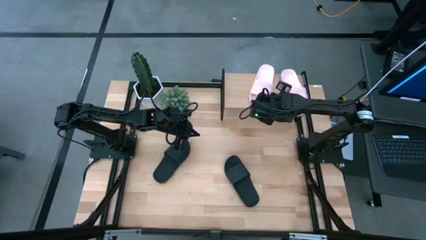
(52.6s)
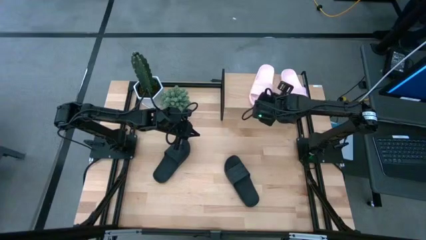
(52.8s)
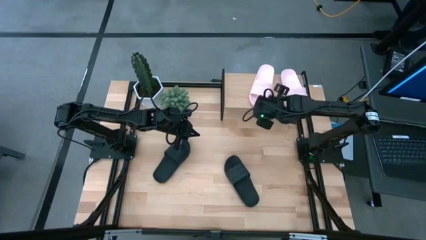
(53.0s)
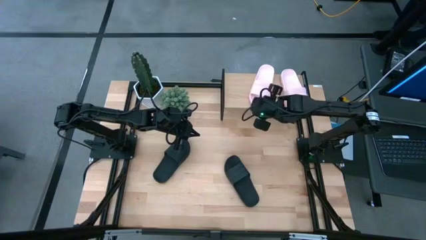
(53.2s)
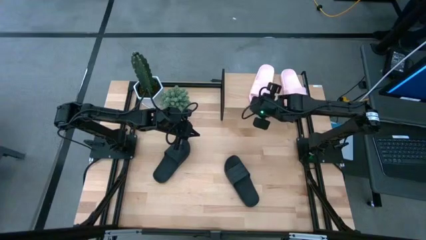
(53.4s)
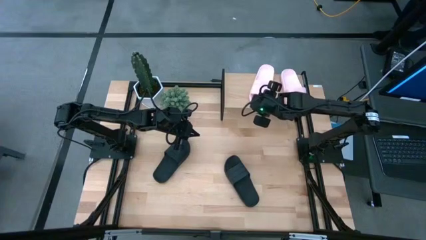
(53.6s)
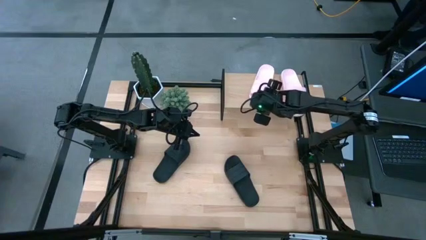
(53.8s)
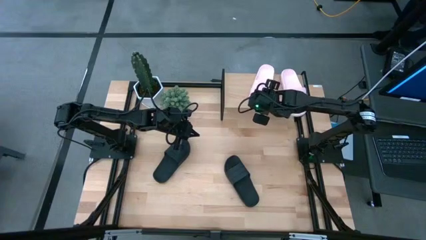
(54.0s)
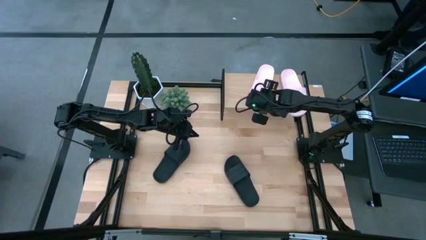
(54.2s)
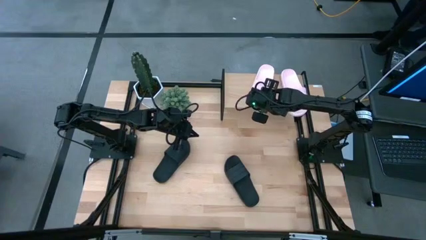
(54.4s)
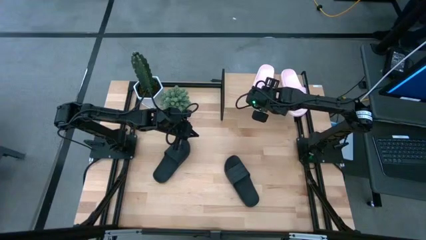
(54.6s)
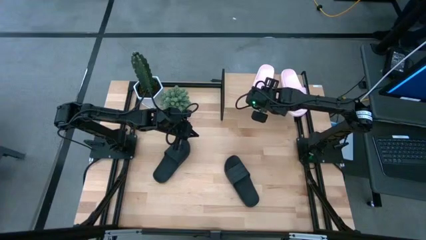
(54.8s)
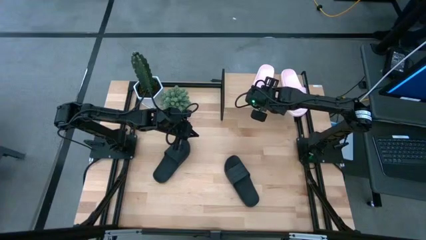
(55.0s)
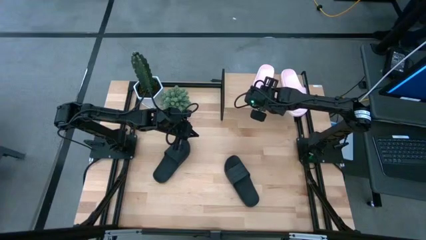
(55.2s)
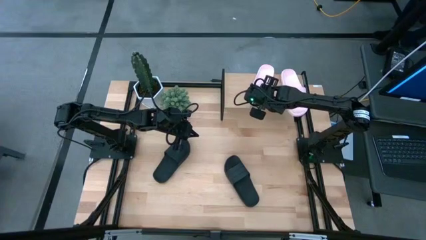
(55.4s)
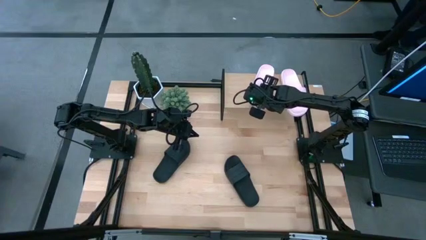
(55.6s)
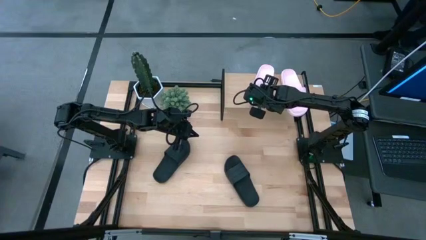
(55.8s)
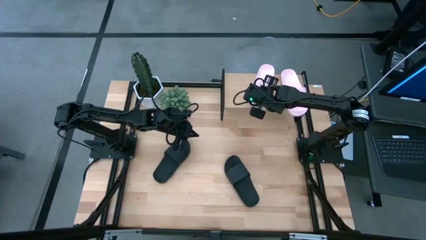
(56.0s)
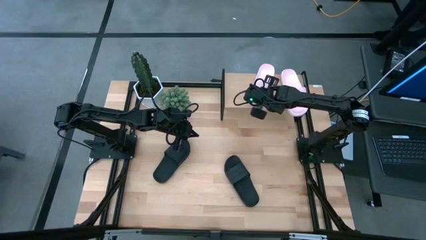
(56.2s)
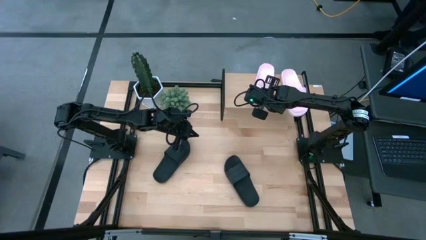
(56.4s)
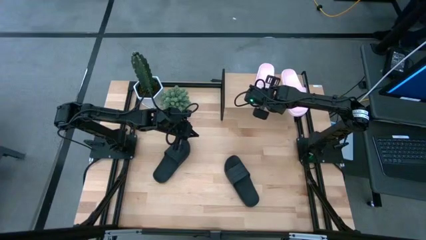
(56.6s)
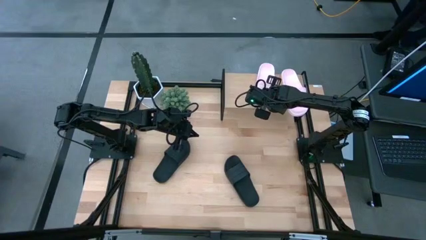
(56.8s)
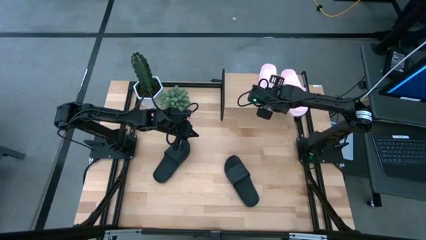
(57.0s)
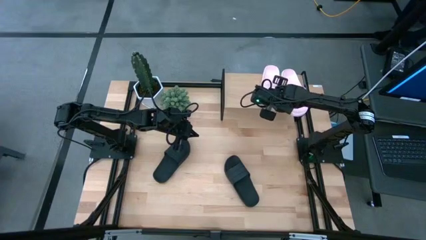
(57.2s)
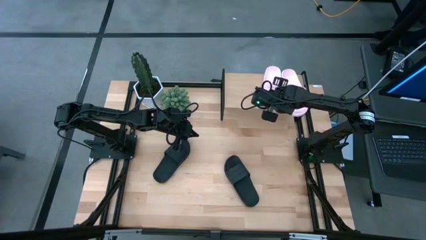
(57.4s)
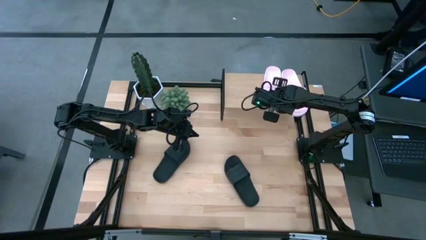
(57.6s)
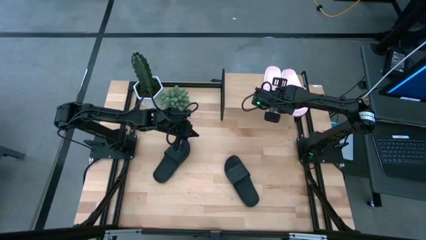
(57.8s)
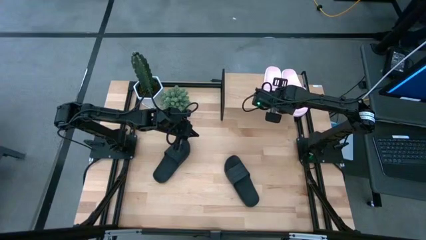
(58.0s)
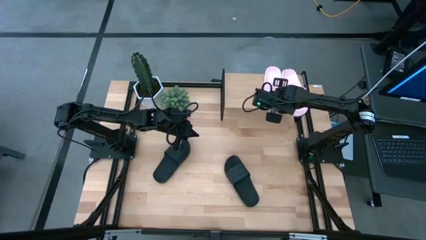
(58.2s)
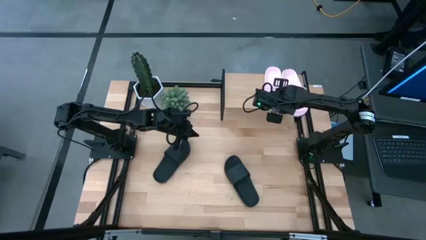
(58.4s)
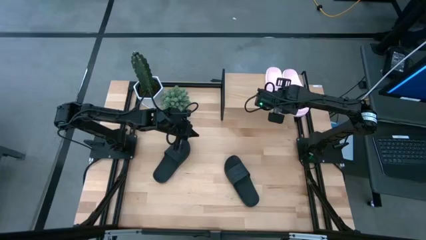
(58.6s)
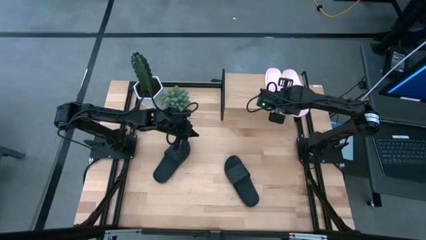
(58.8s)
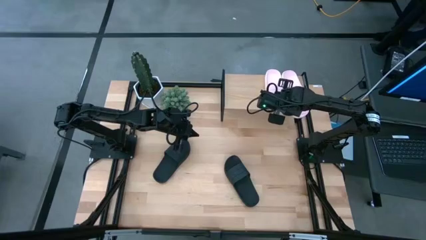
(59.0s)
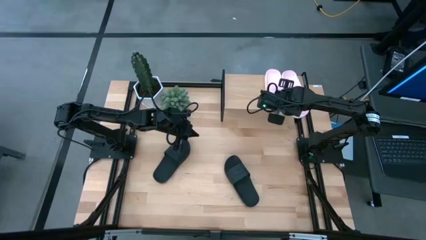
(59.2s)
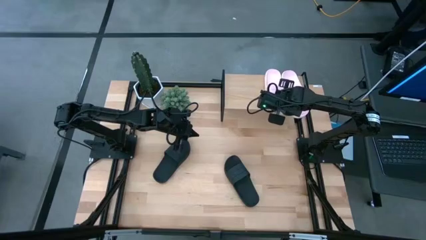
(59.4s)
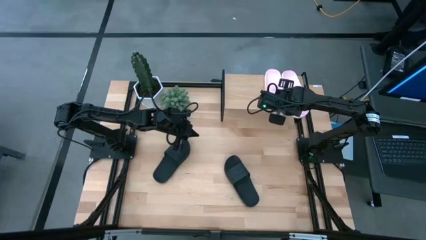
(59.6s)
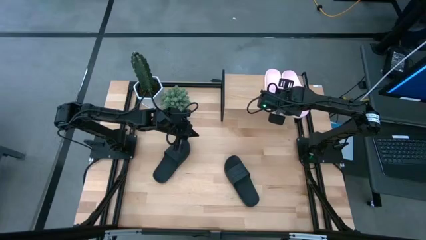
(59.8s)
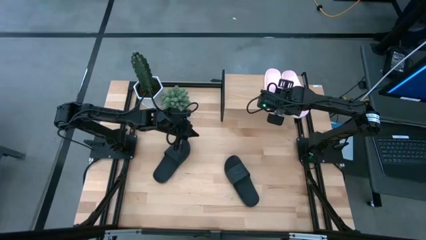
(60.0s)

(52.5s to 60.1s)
Task: Pick and place slides into the shelf
Put the pink slides on the shelf

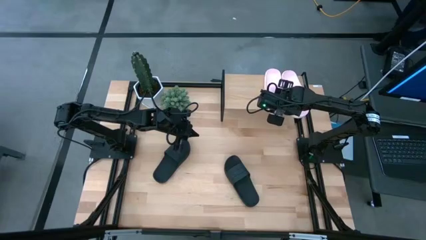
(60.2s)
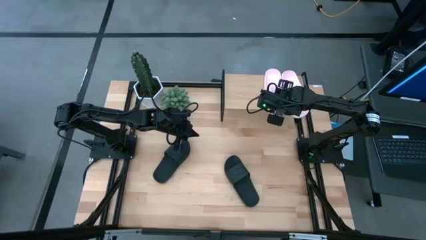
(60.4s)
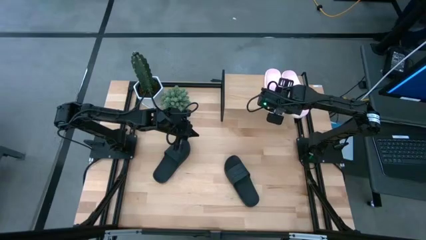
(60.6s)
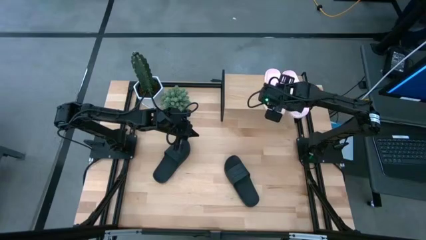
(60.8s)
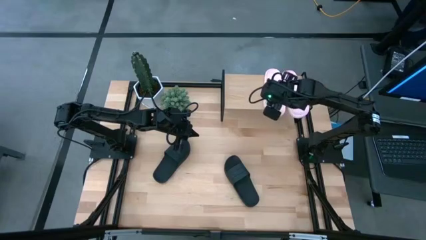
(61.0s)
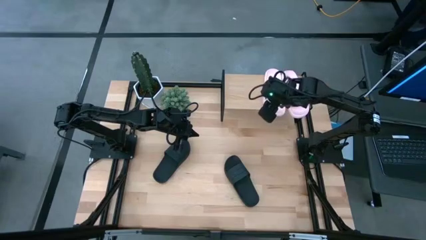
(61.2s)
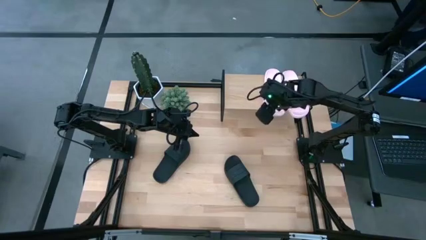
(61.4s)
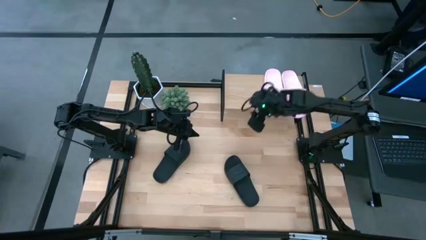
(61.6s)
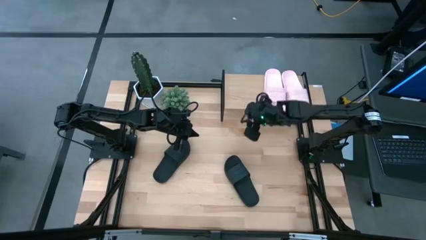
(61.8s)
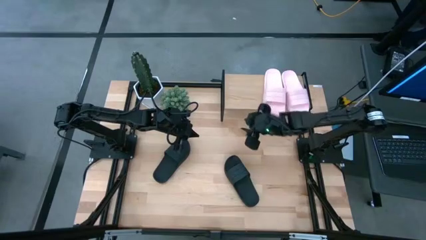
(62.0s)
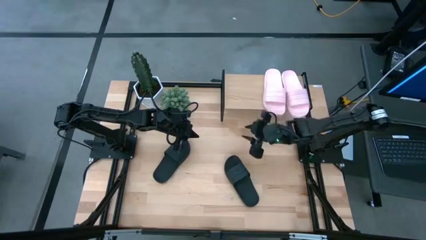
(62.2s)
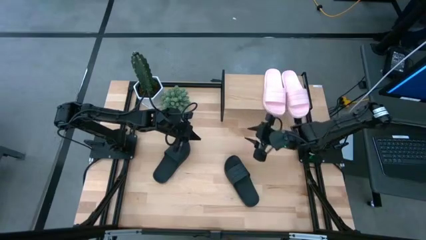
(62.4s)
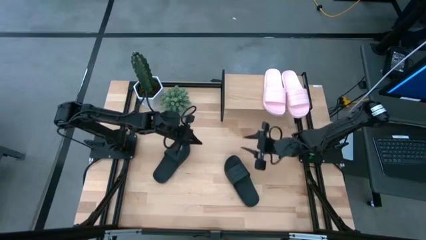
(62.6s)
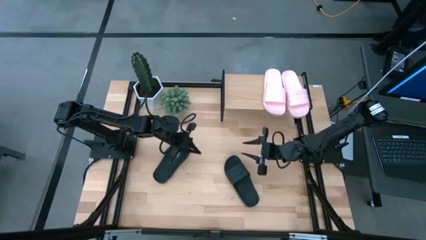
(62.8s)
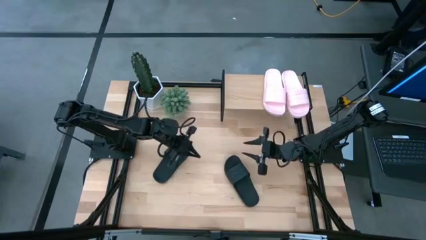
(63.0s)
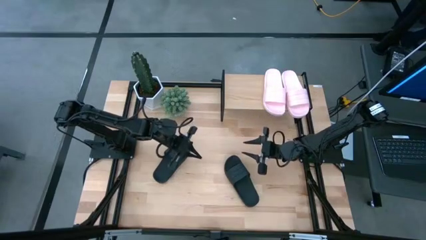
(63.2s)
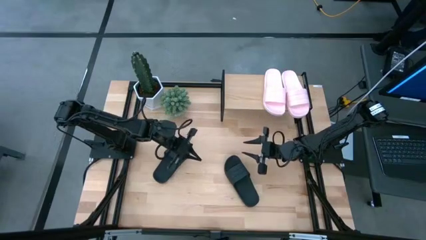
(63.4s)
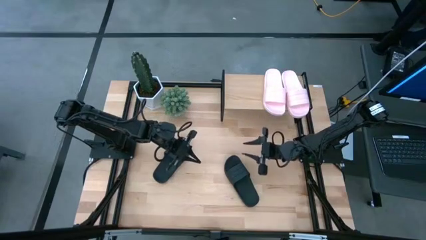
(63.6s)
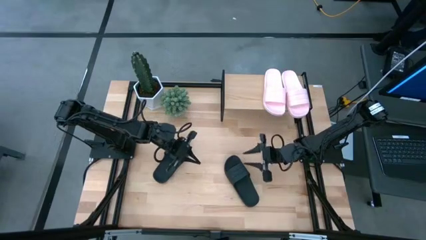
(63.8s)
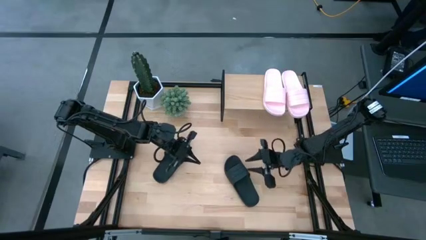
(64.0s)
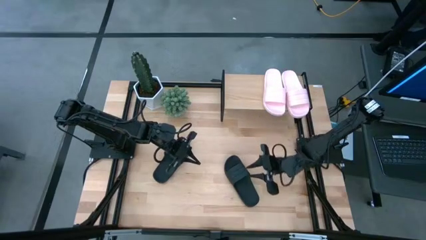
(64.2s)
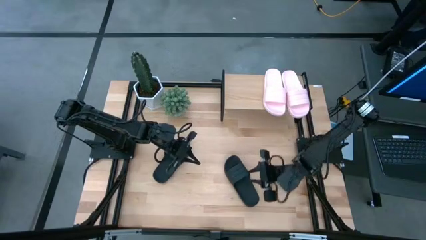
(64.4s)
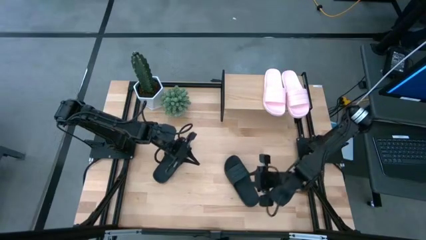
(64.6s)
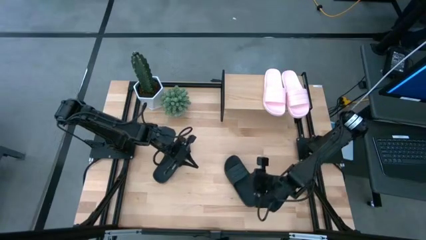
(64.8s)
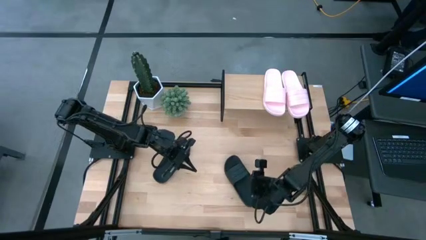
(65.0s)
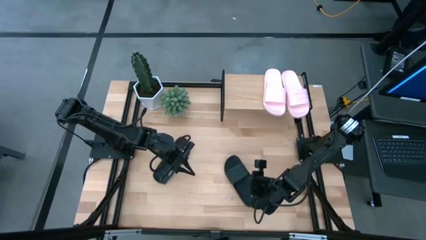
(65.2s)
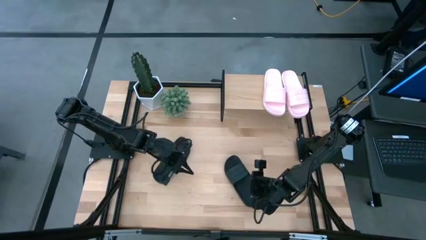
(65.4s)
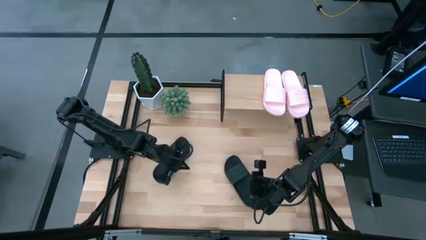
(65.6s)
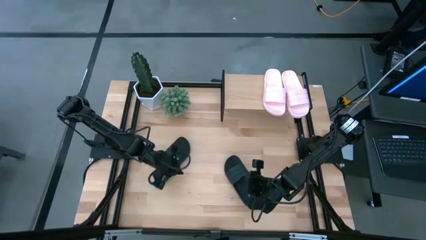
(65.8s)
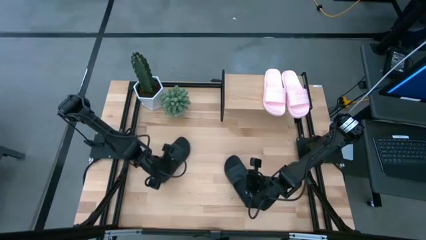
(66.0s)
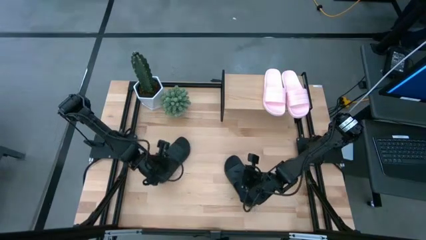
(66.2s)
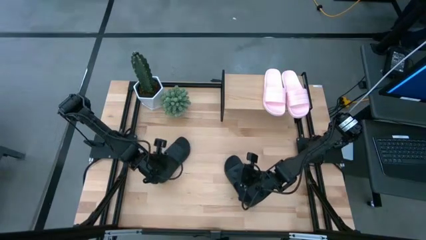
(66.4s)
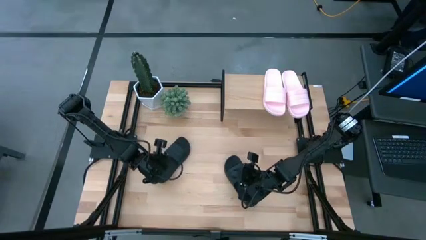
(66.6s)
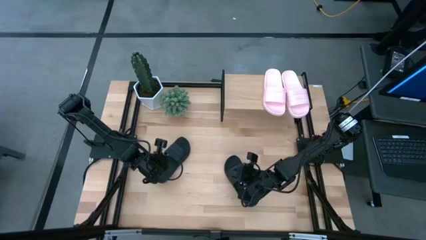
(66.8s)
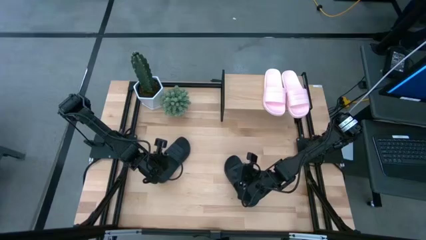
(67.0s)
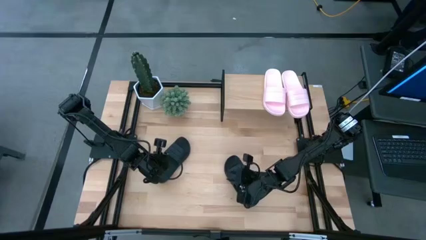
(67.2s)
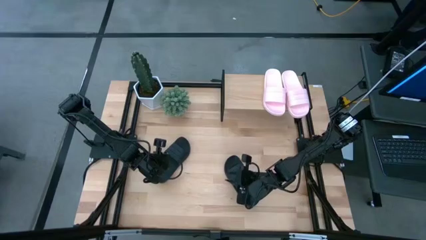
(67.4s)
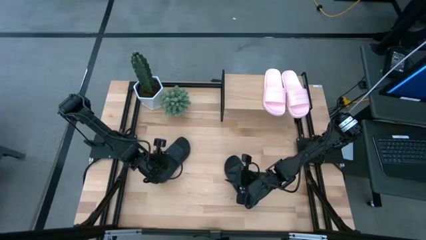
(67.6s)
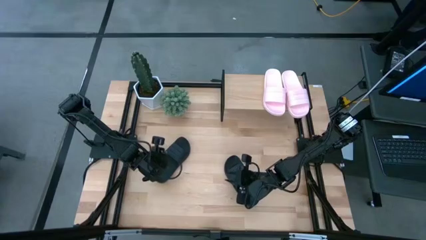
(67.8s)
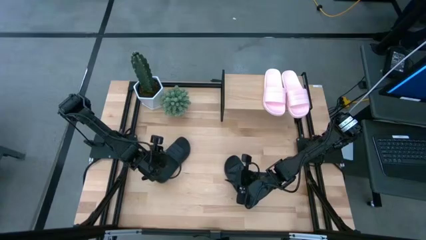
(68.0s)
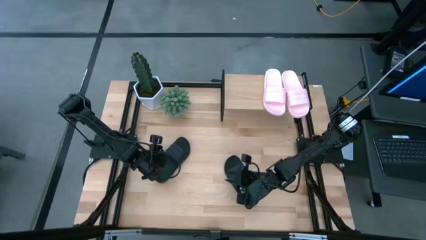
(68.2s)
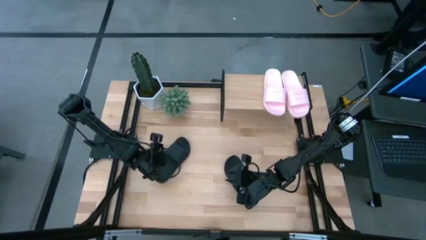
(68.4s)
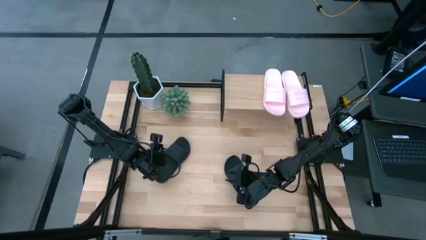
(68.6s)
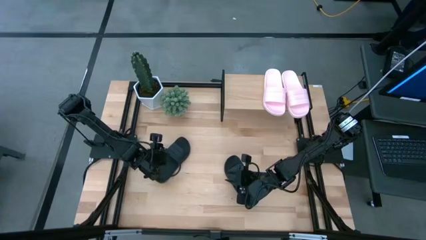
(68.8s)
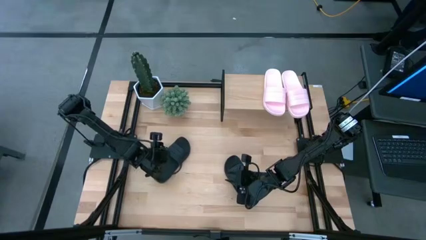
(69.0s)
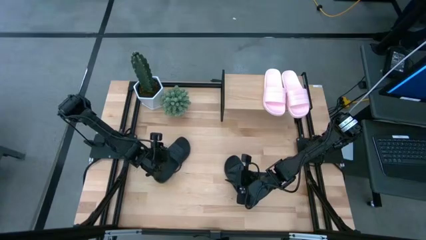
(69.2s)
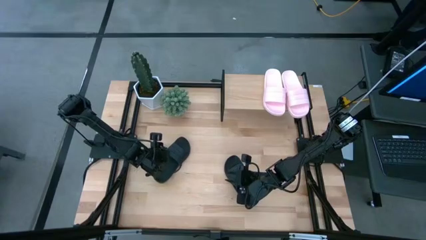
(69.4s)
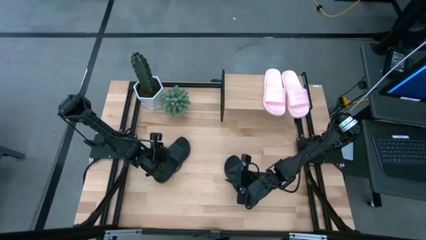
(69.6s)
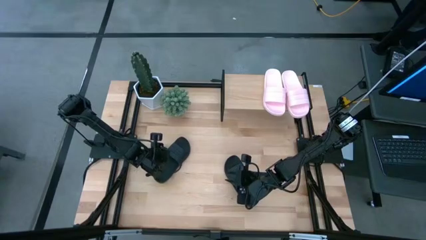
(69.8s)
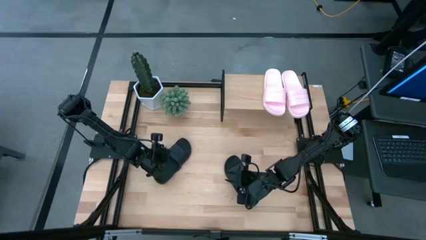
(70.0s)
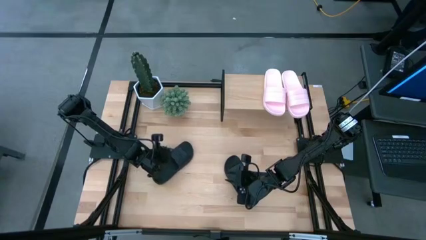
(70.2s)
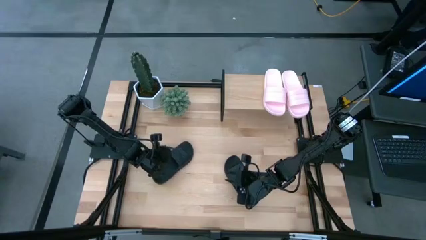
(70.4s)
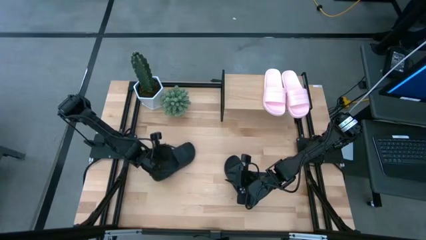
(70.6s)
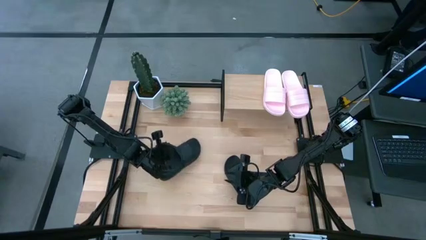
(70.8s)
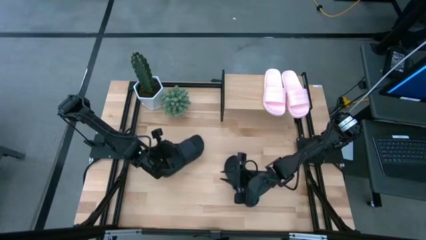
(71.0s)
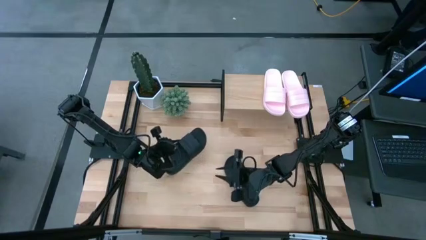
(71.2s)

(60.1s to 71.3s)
Put the left black slides on the shelf
